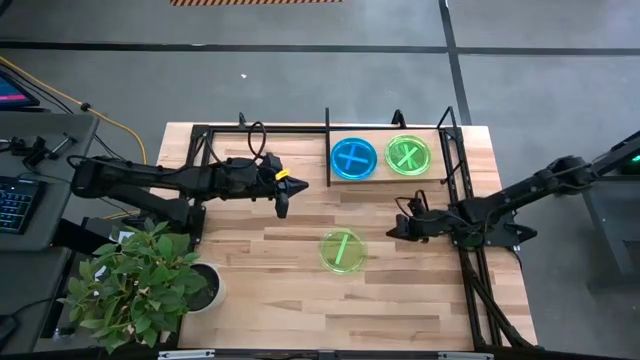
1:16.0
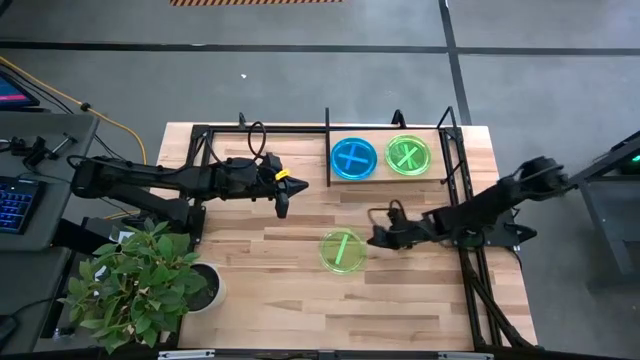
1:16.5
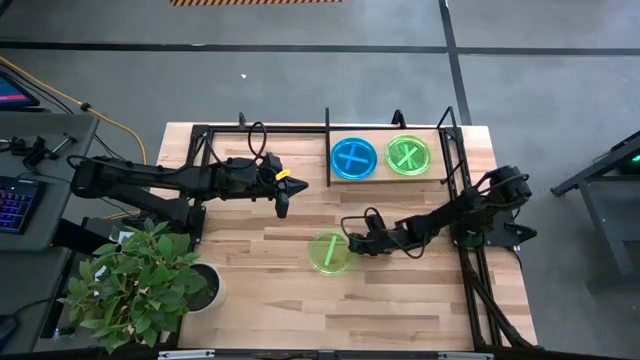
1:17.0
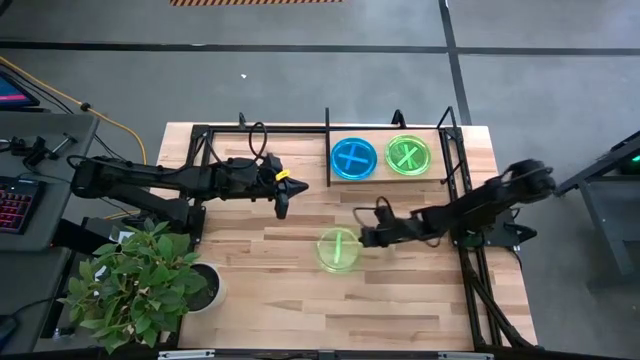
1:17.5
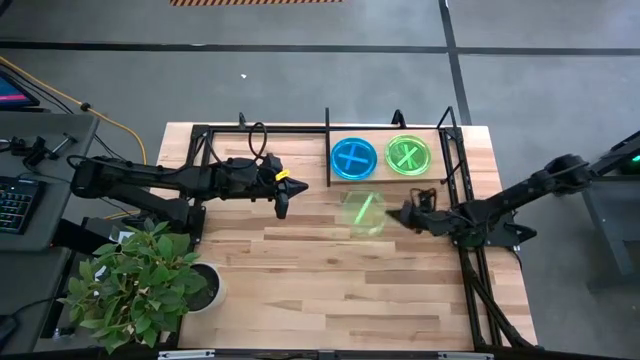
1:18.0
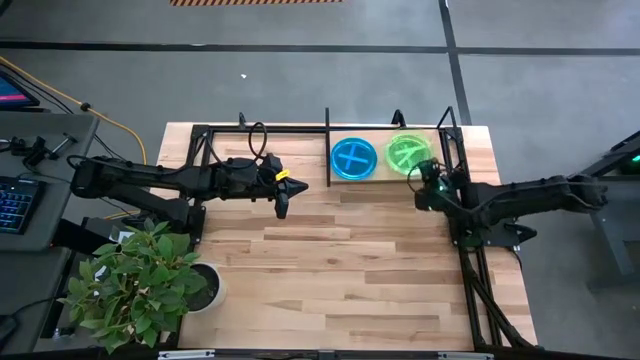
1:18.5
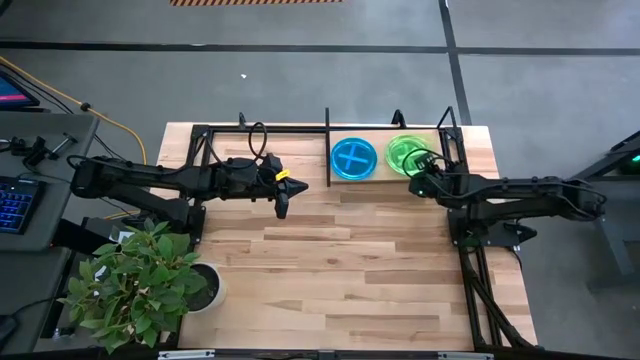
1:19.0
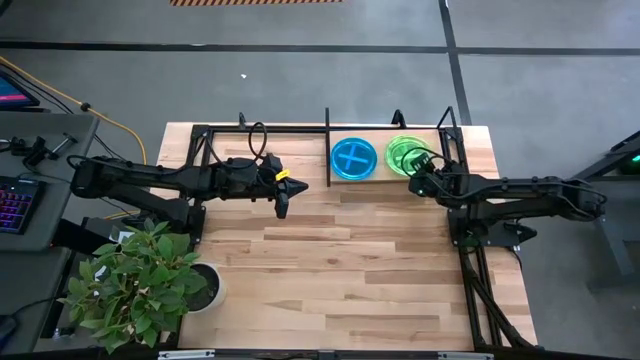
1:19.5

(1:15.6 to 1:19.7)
Task: Place and stack plates onto a shelf
Stack the green plate on top of the stacked green plates on the shelf

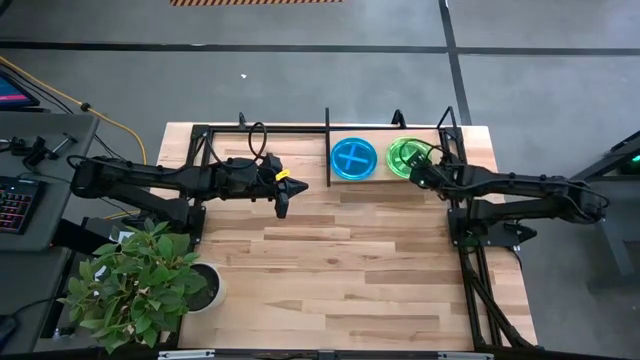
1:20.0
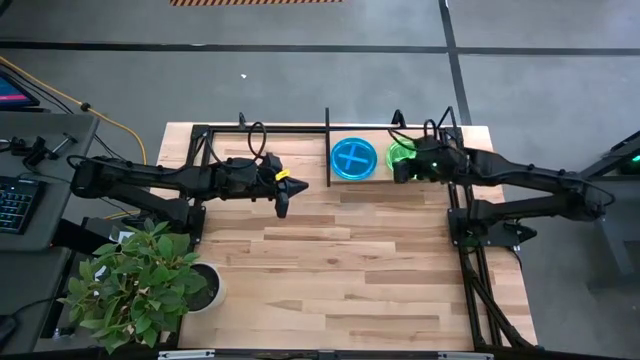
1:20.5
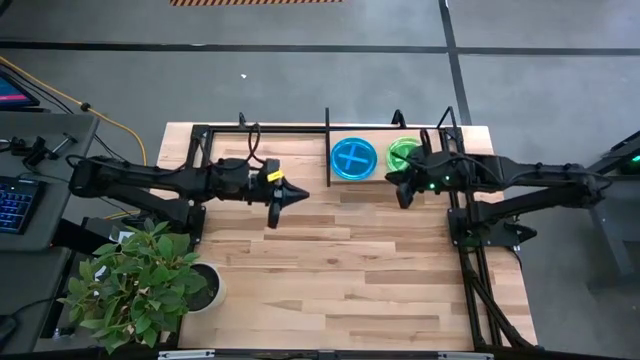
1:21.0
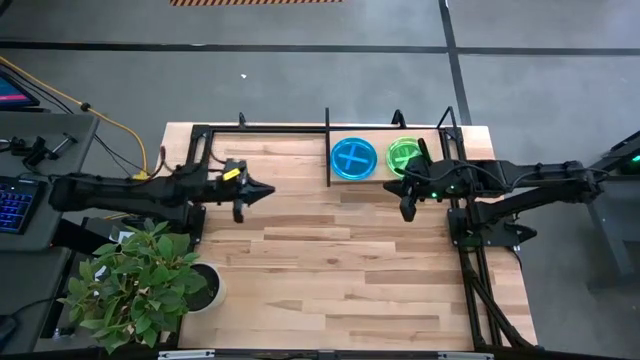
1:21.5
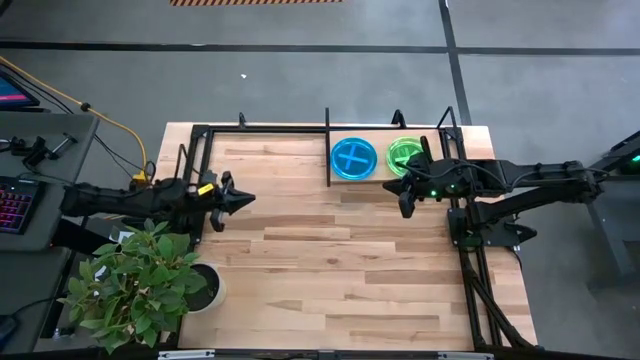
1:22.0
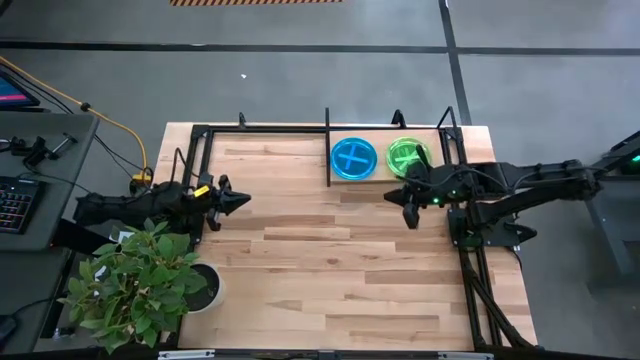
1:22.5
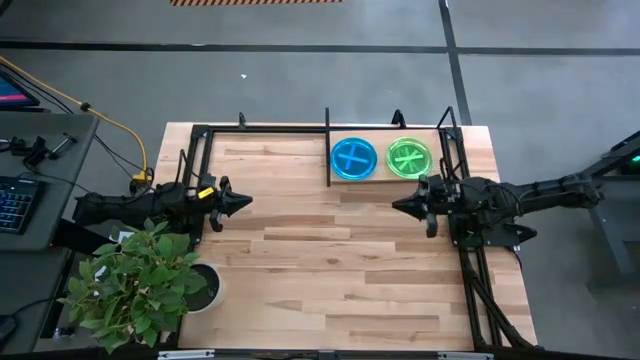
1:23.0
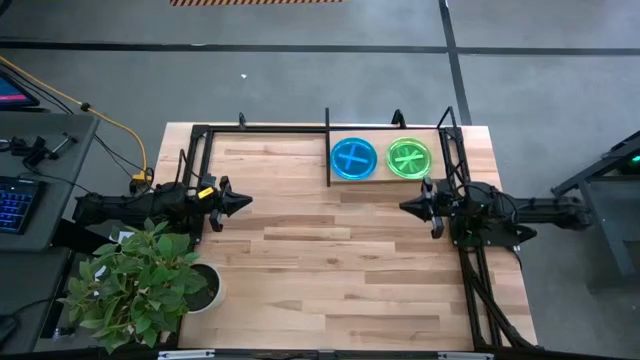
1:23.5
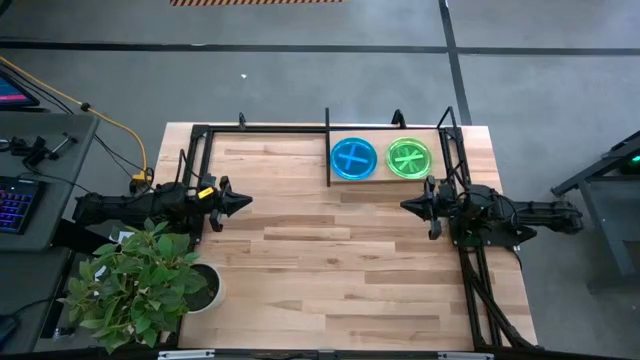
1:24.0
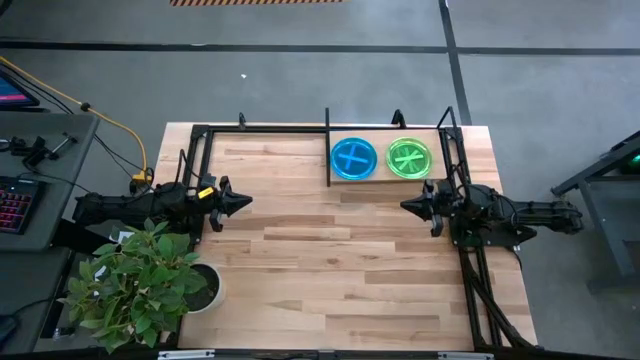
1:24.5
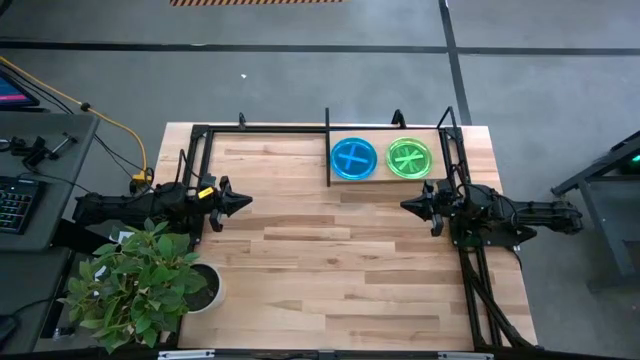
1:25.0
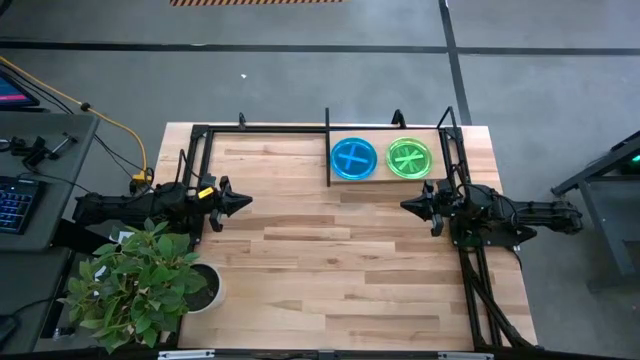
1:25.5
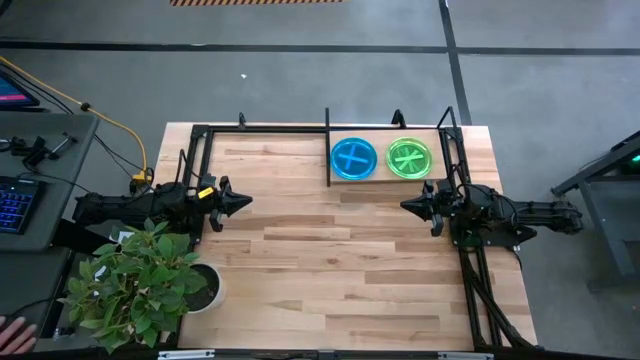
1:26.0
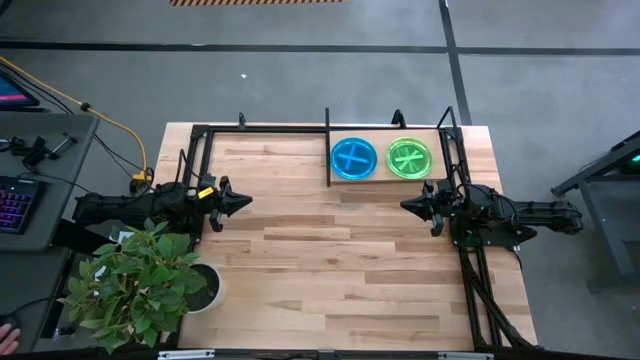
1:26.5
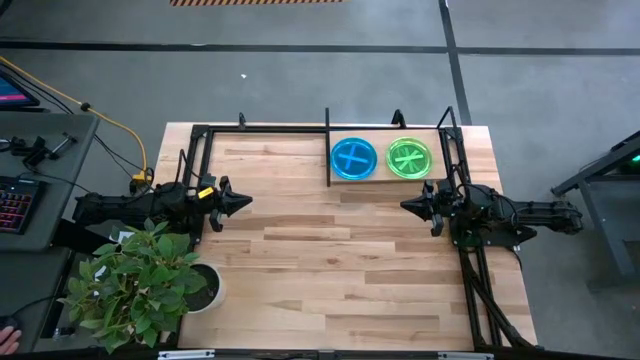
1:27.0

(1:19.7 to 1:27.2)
Return to Home Position

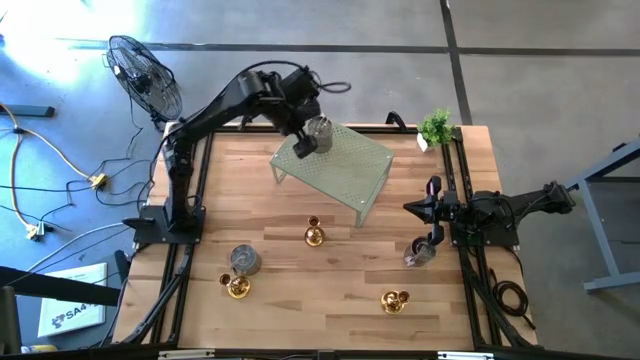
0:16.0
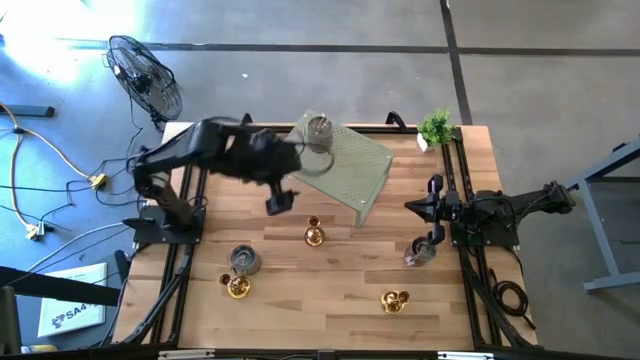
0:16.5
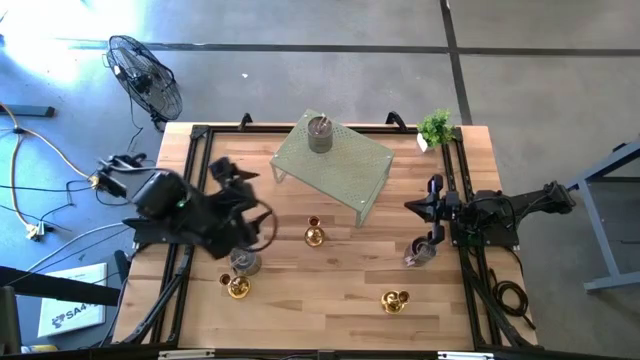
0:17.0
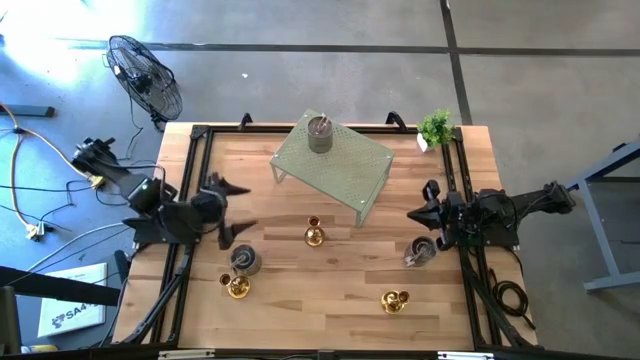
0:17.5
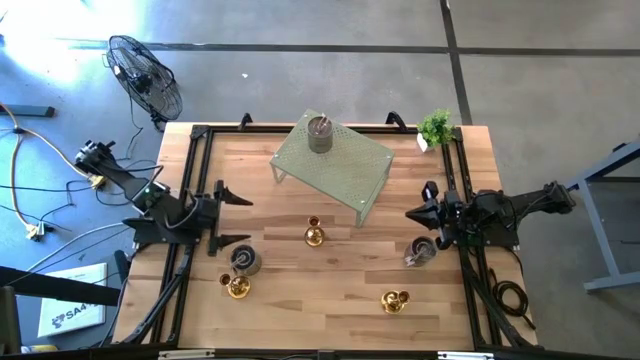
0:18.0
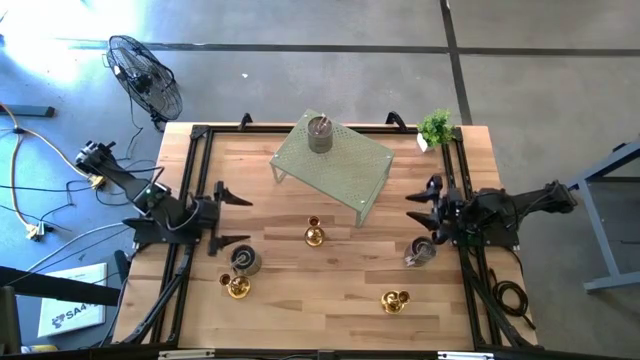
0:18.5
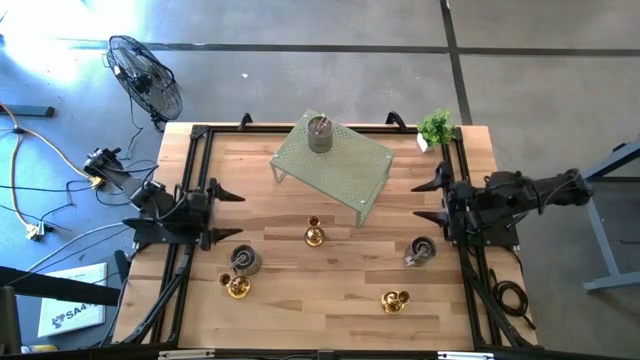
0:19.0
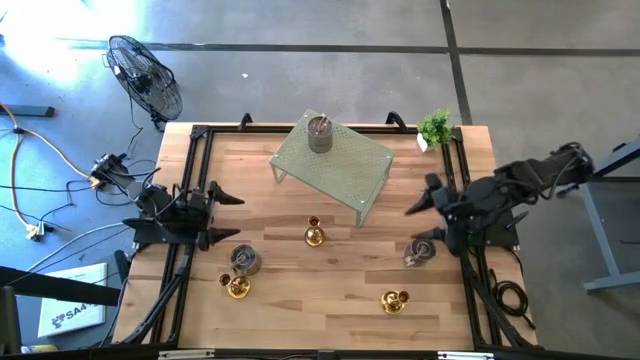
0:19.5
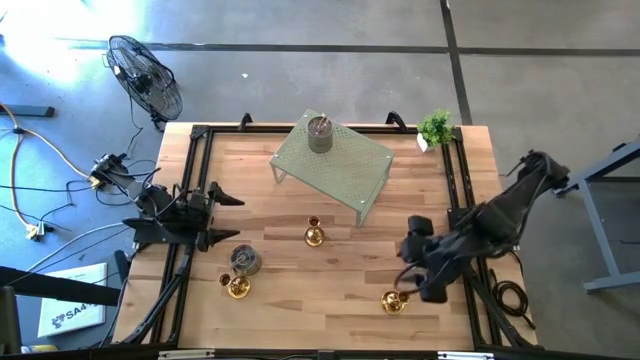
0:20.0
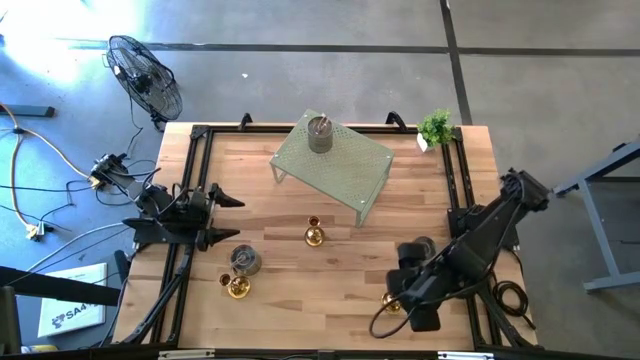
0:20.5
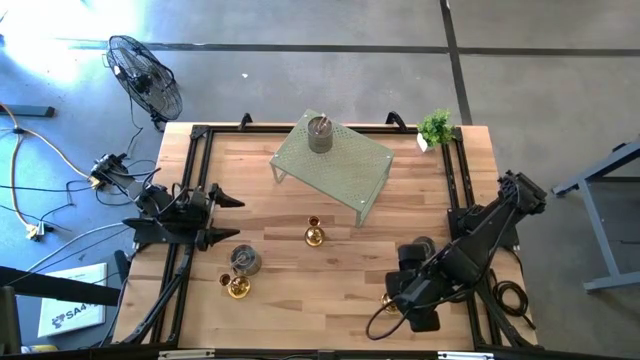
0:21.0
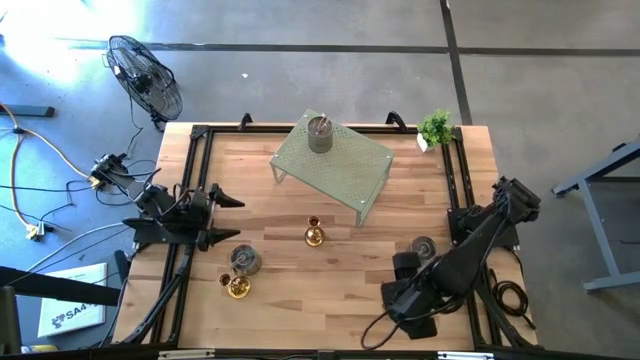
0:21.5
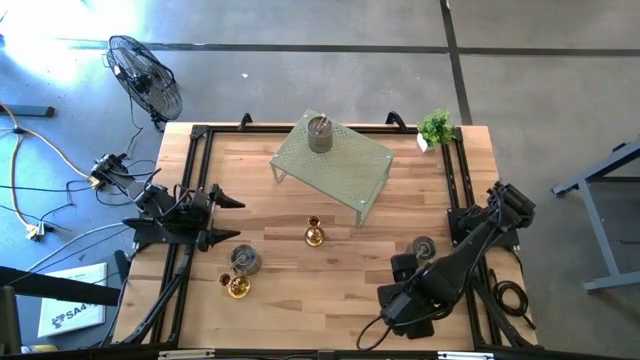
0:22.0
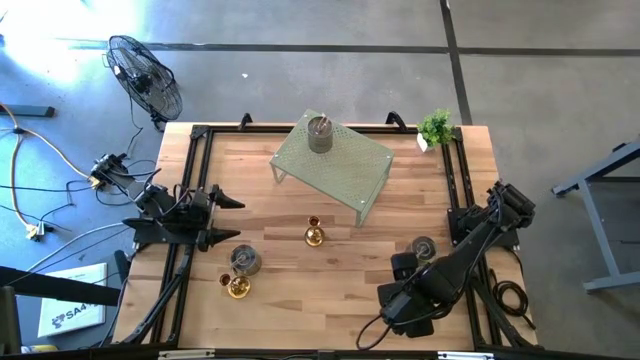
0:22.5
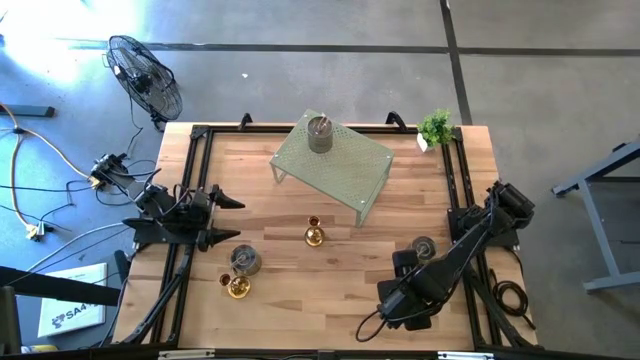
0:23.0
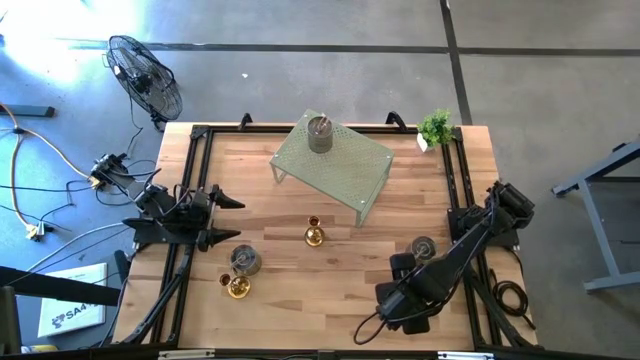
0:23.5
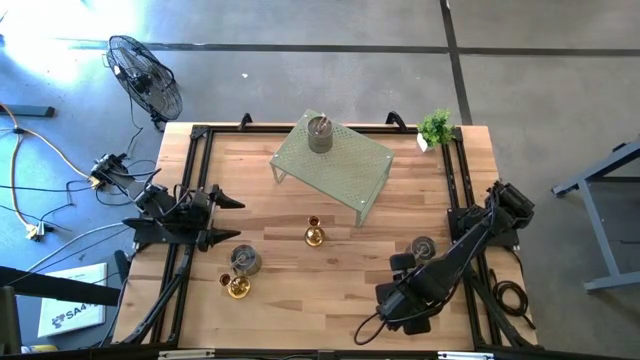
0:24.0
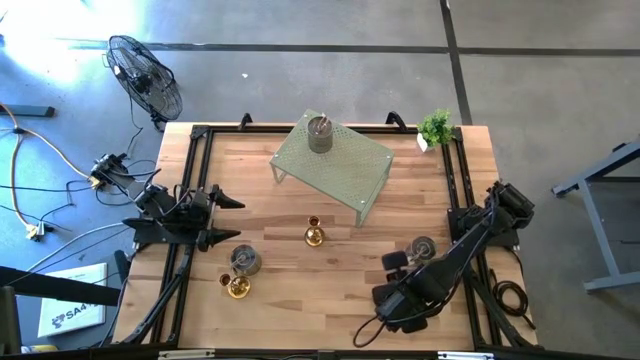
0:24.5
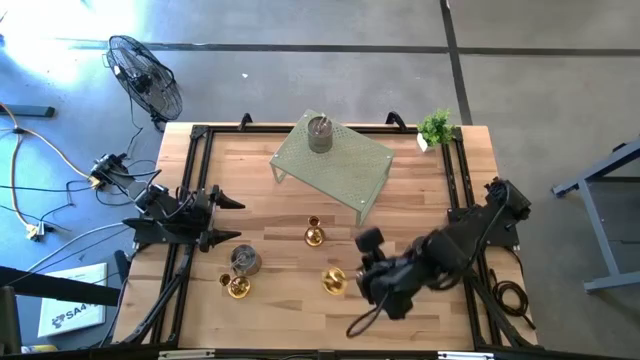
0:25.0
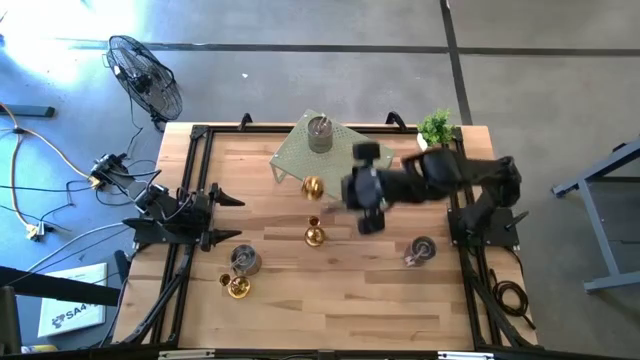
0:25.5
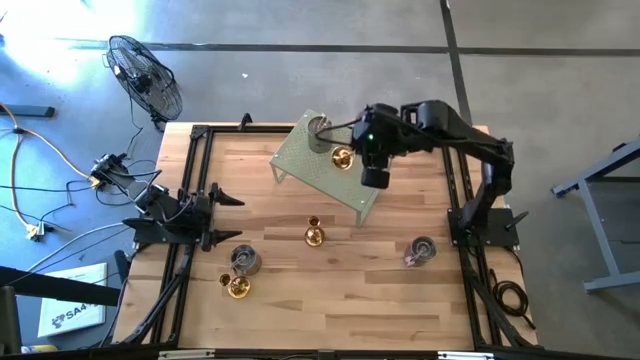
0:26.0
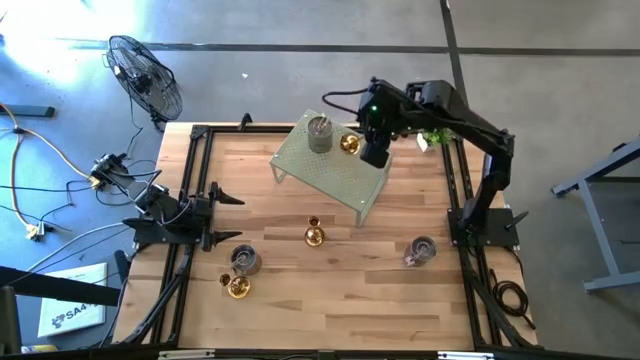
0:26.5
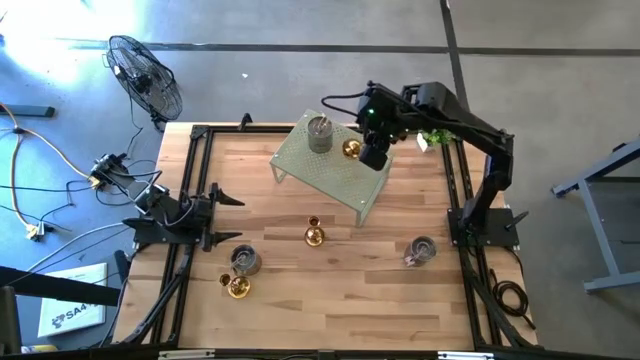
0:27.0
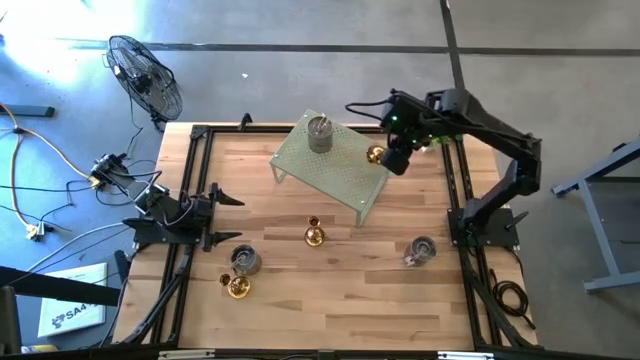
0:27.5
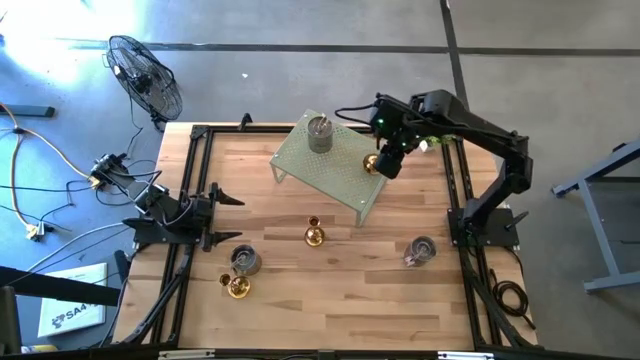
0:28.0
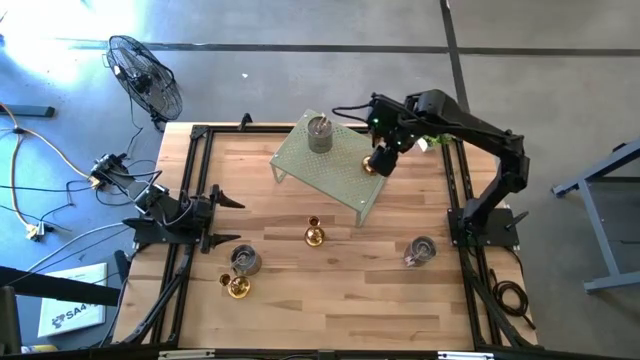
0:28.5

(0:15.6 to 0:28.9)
Task: Pick & Place candle stick holders
Put the right gold candle holder on the shelf
